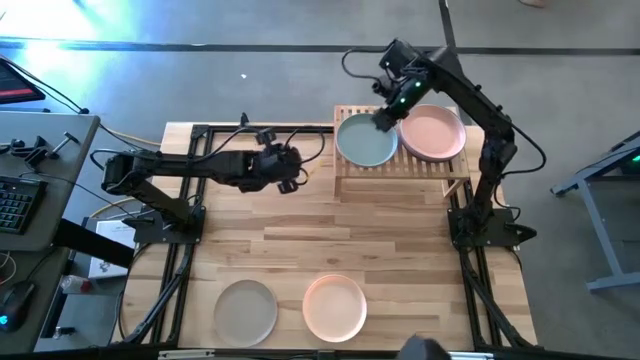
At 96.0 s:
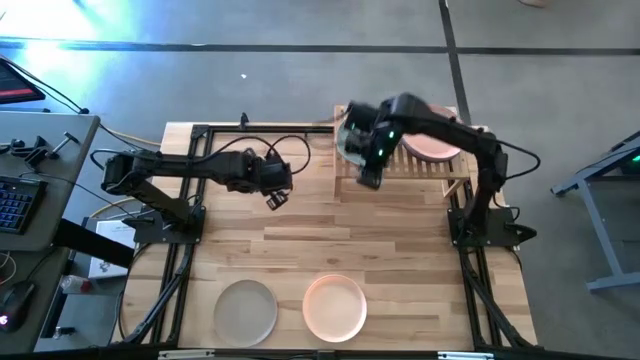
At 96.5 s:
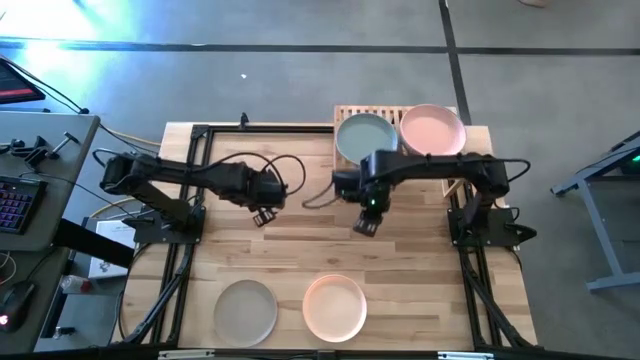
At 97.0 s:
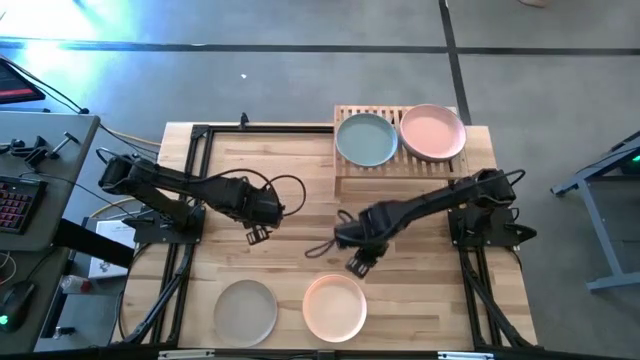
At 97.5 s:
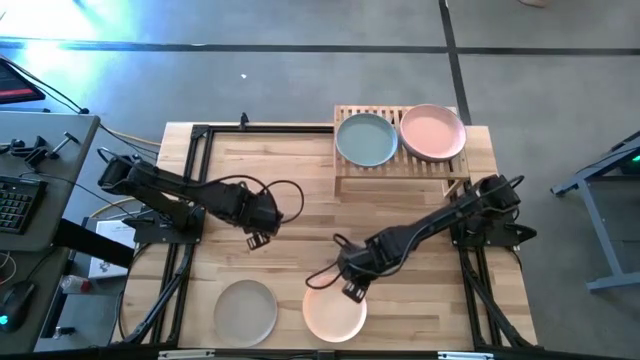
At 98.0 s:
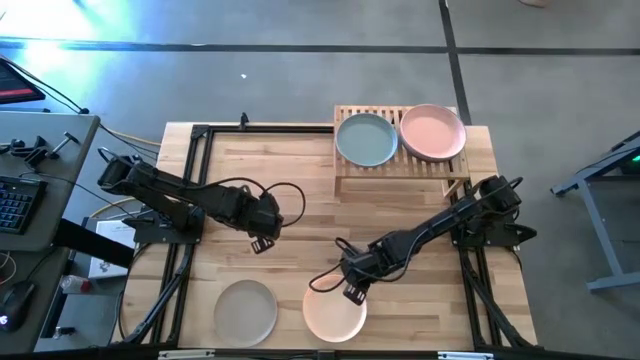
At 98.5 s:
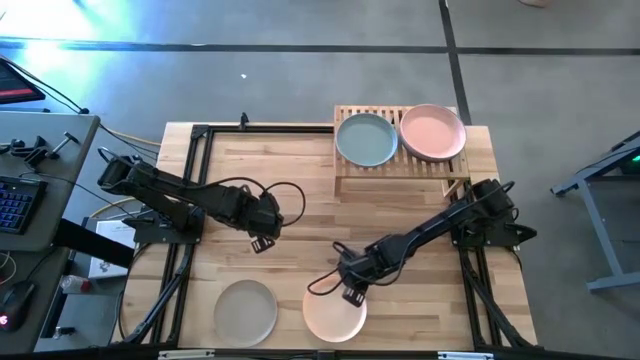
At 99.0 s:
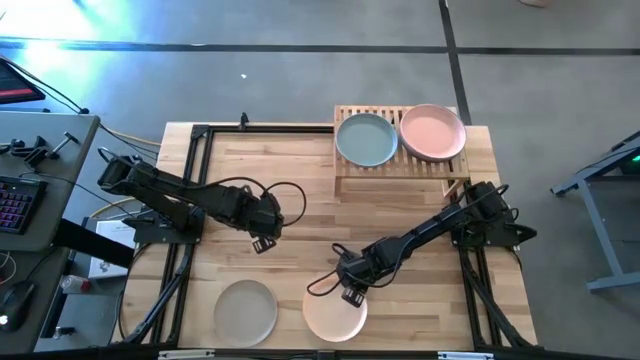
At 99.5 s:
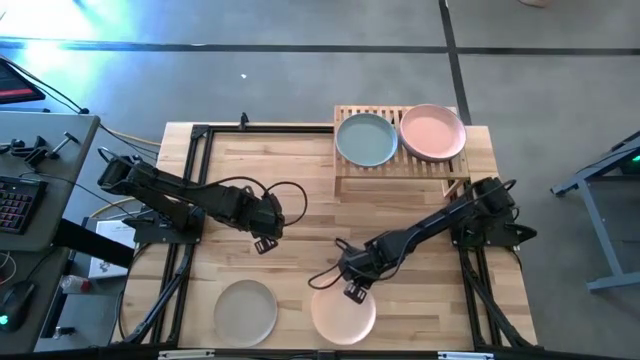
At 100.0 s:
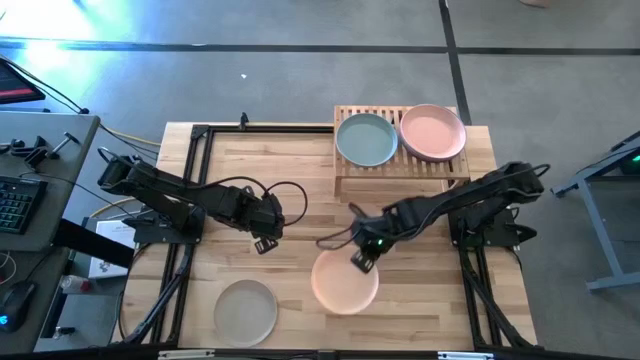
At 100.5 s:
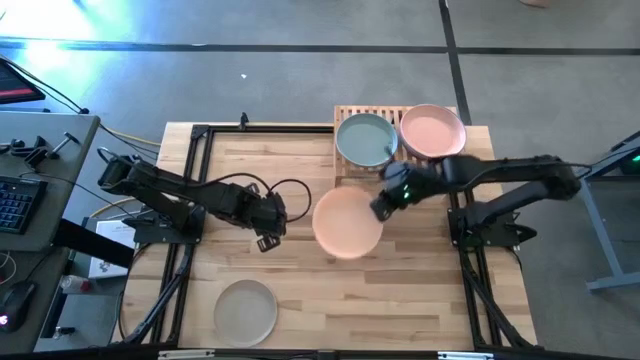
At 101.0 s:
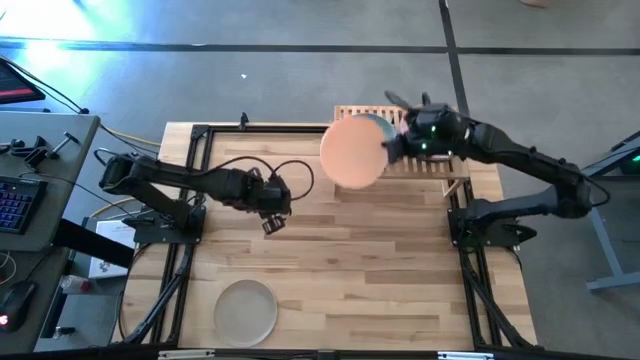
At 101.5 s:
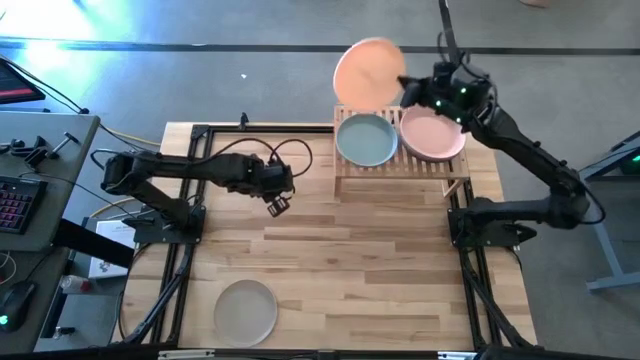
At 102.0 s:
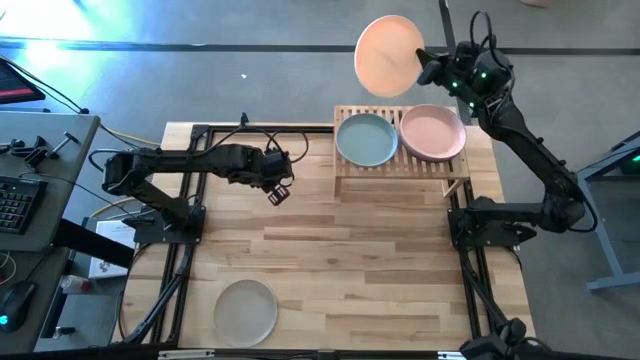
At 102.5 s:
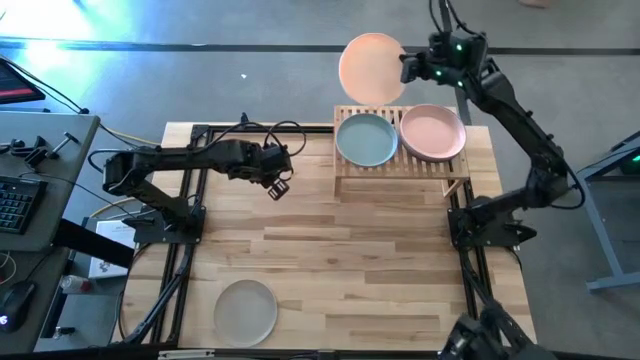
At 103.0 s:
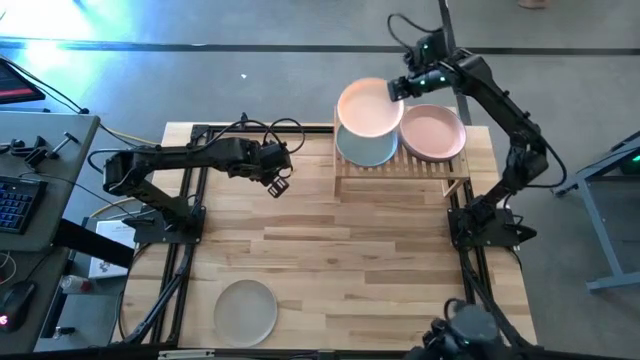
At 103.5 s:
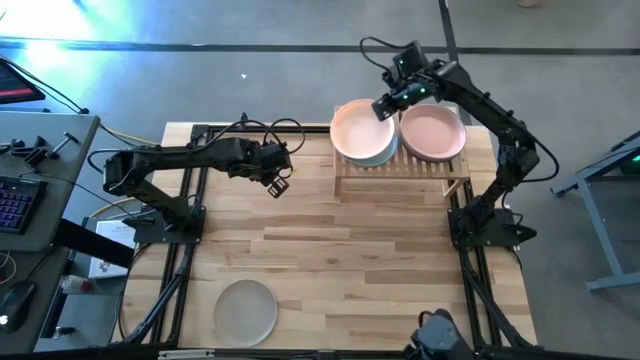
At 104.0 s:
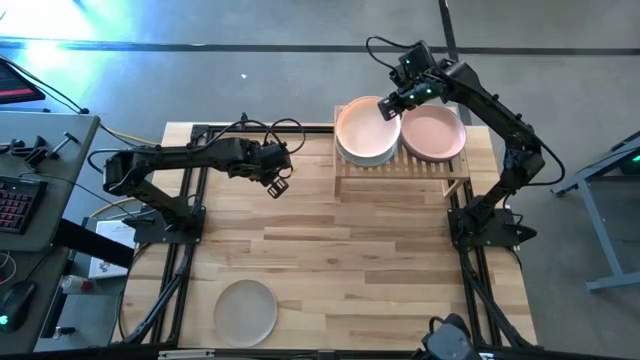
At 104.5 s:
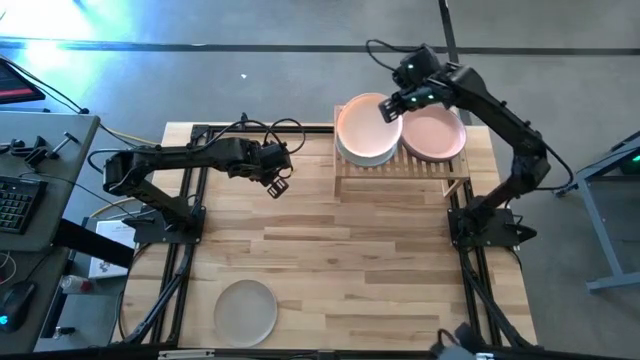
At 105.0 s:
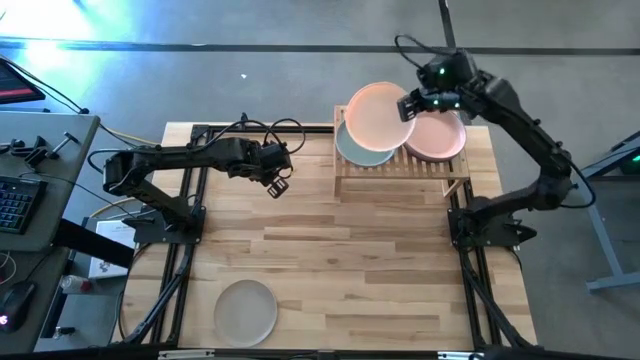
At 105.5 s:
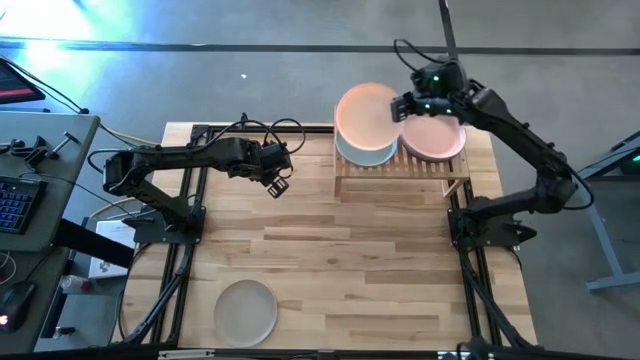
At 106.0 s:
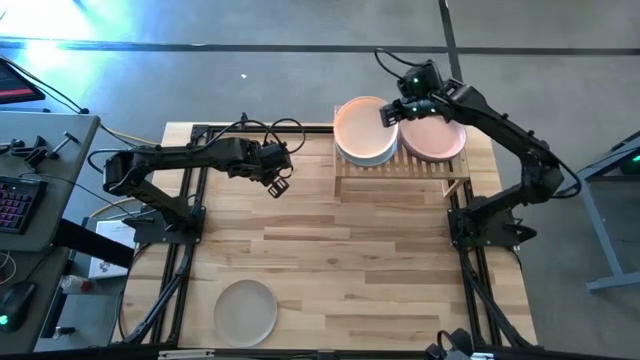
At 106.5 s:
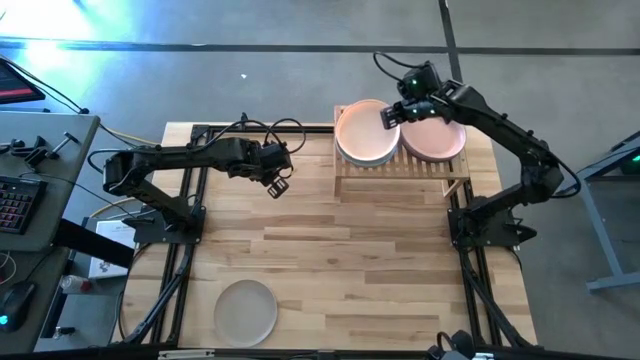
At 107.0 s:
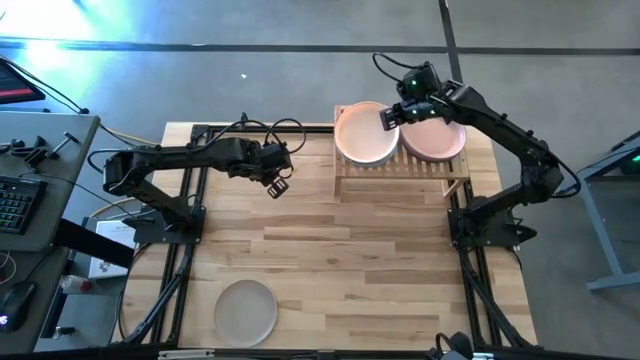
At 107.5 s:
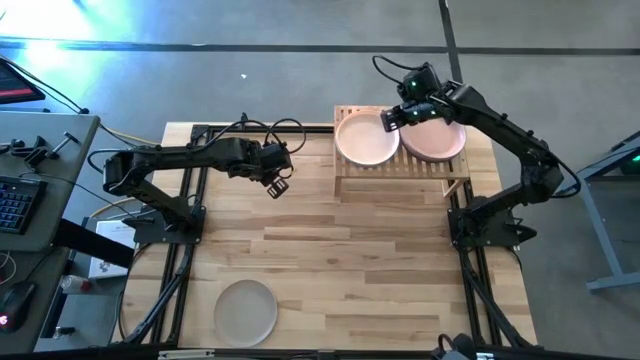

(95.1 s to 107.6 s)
Task: Place and stack plates onto a shelf
Stack the light orange plate on top of the light blue plate on the shelf

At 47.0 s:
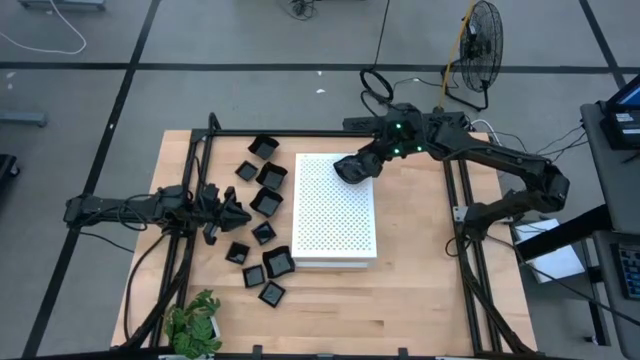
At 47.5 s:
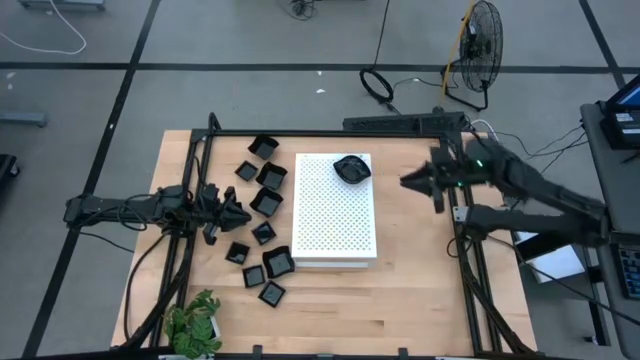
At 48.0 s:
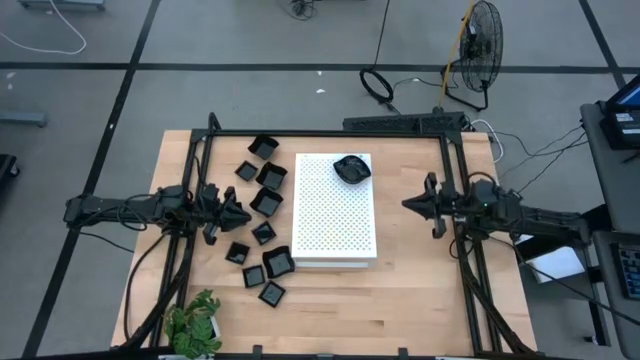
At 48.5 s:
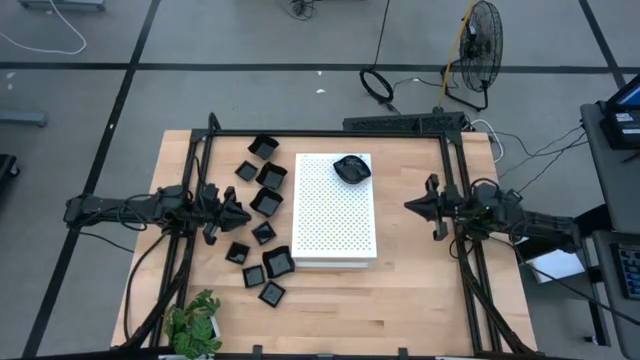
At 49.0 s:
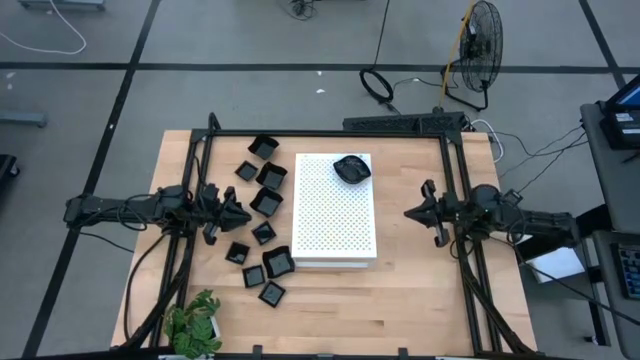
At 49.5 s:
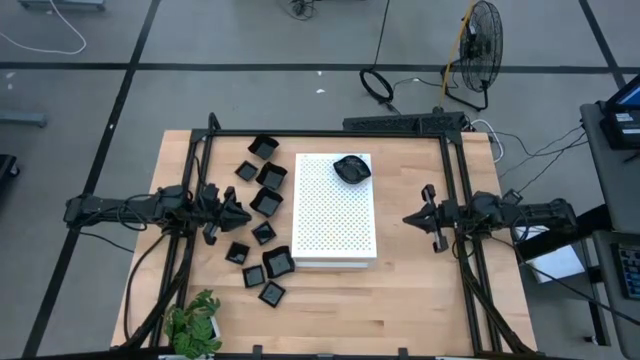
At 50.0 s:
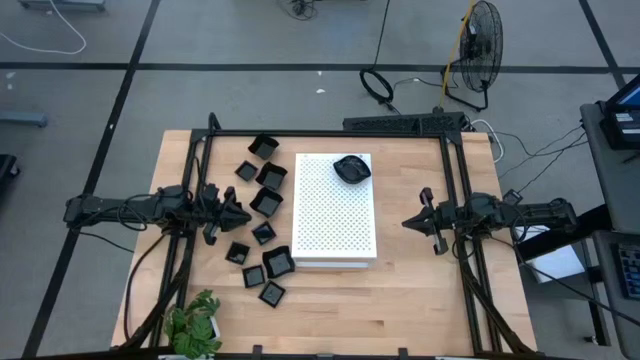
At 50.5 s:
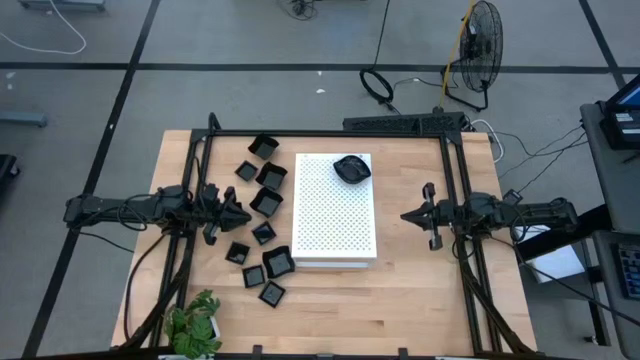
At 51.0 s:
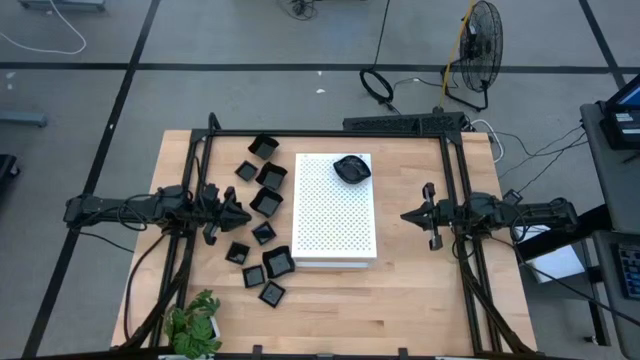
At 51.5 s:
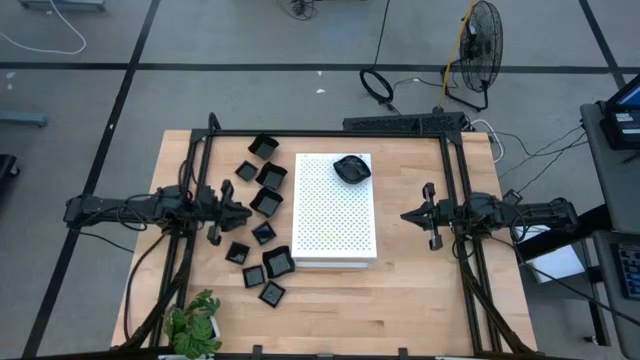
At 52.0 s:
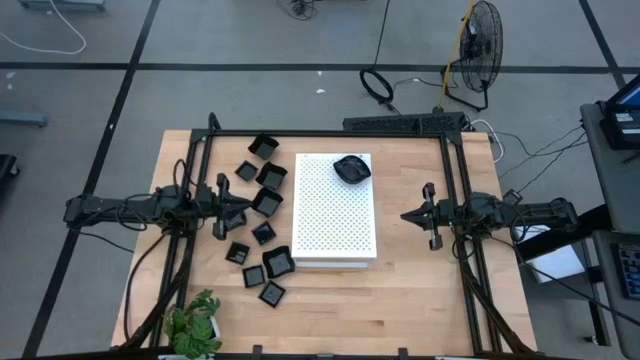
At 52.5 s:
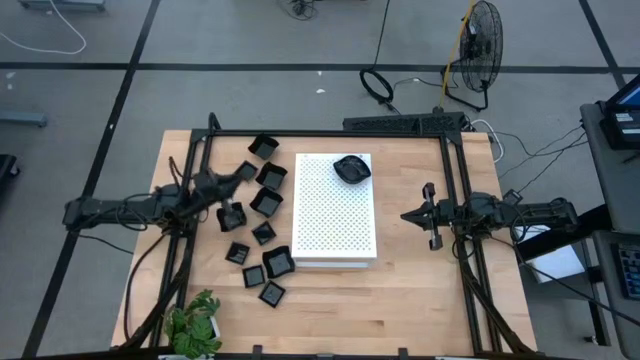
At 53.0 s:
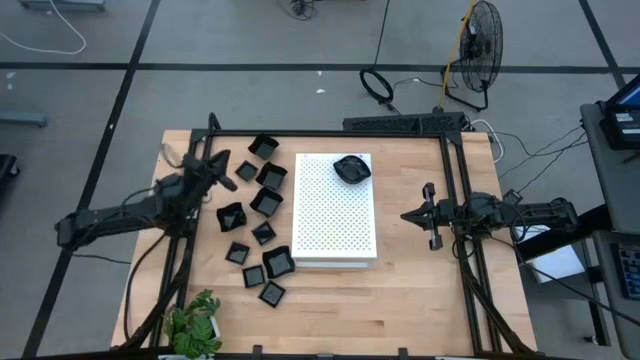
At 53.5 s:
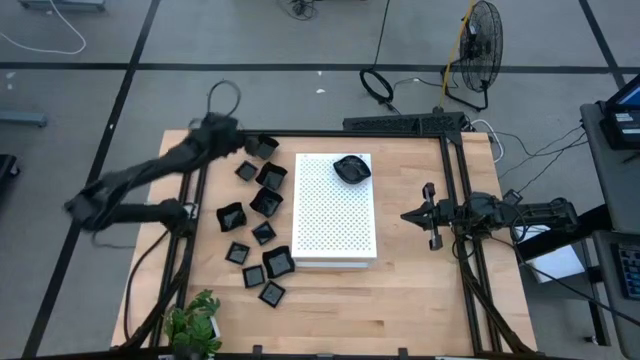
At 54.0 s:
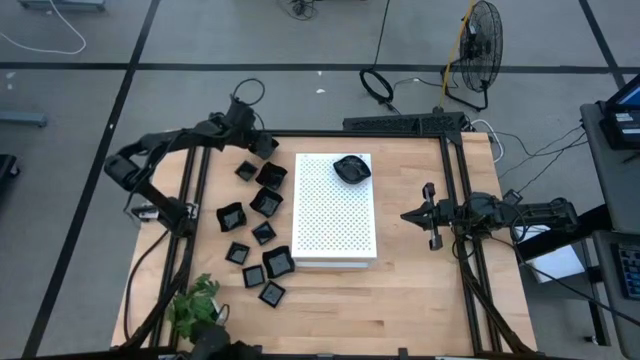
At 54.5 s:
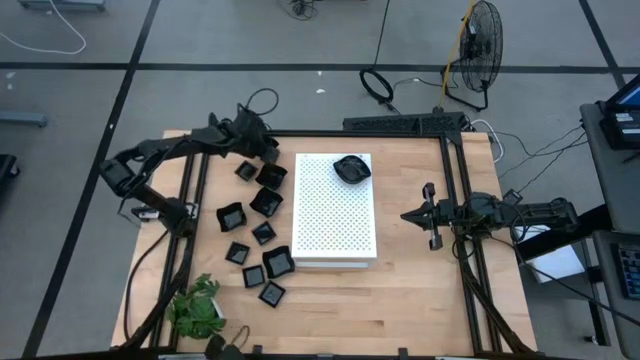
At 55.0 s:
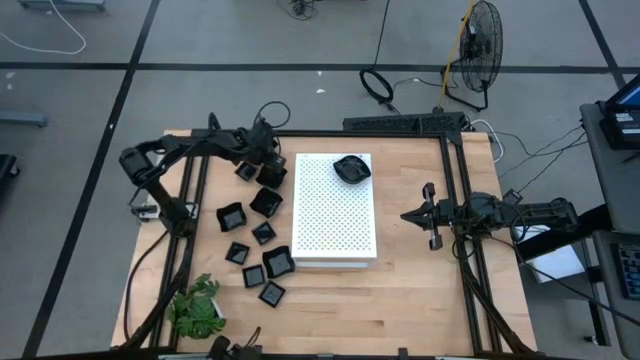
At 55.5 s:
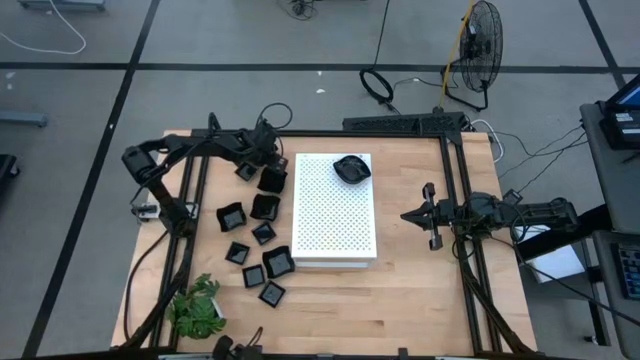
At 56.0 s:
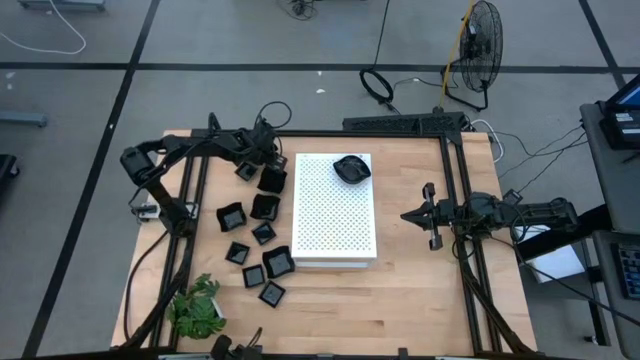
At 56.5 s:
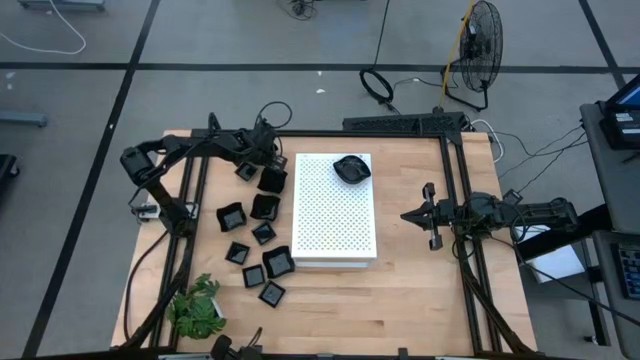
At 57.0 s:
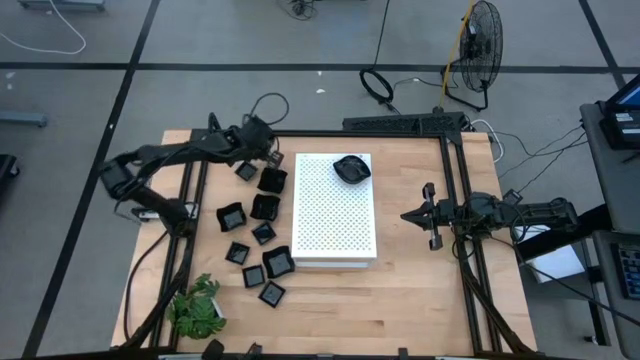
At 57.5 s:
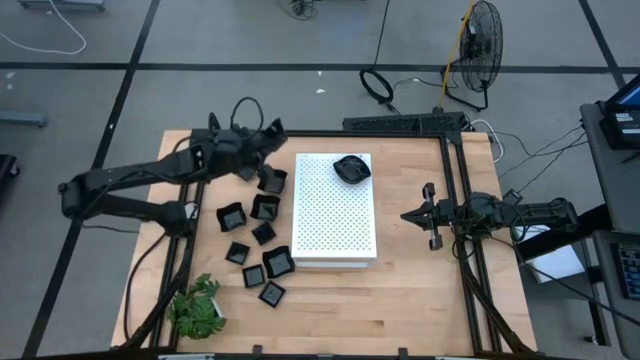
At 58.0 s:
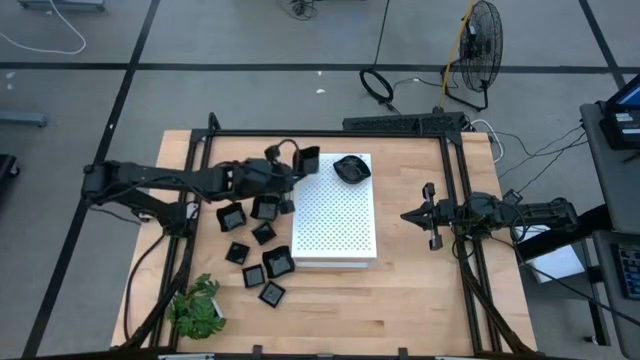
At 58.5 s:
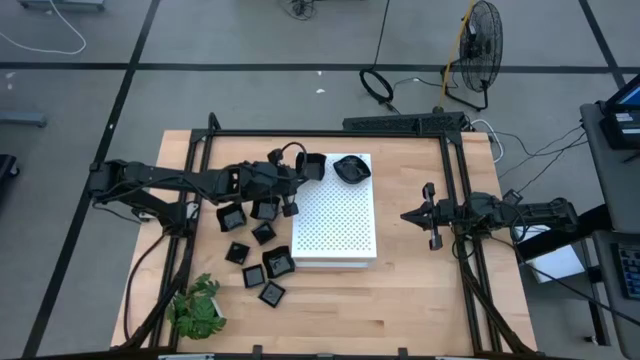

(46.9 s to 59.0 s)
Task: Pick & Place Mini shaped plates
Put the black distorted square plate on the shelf
